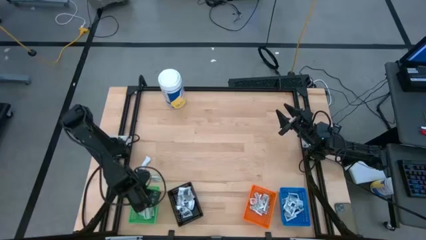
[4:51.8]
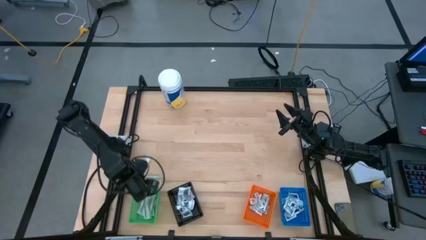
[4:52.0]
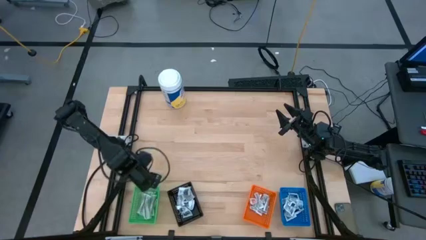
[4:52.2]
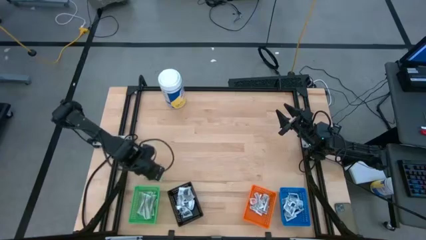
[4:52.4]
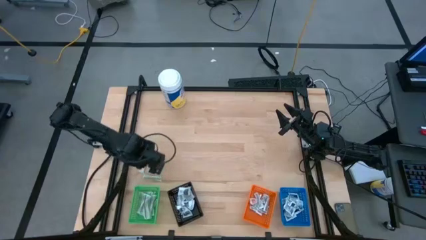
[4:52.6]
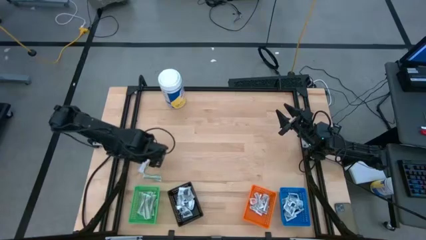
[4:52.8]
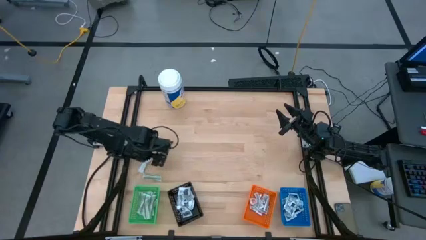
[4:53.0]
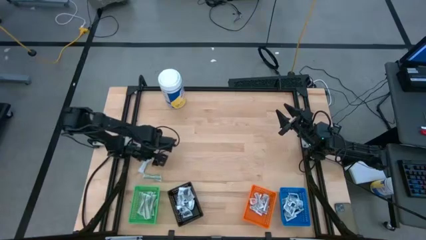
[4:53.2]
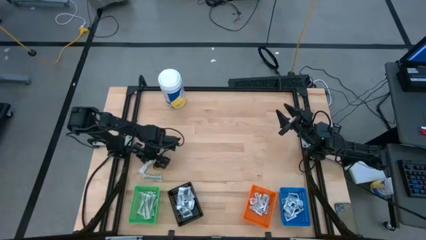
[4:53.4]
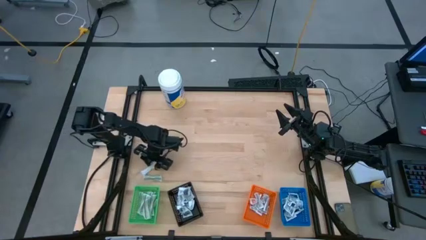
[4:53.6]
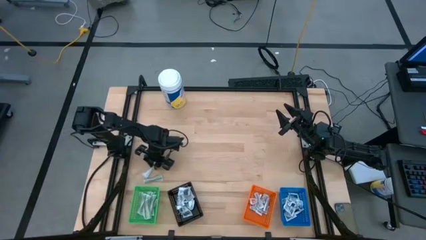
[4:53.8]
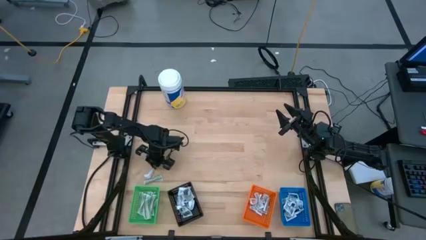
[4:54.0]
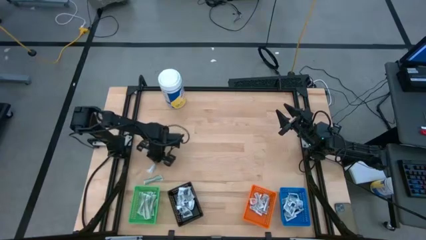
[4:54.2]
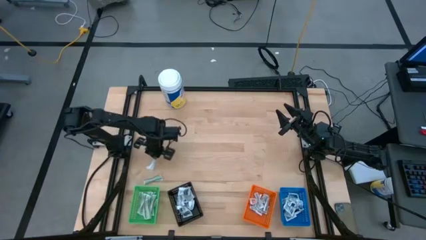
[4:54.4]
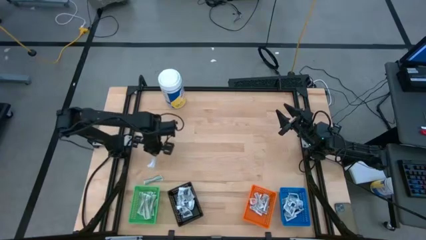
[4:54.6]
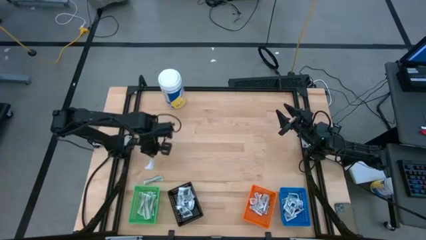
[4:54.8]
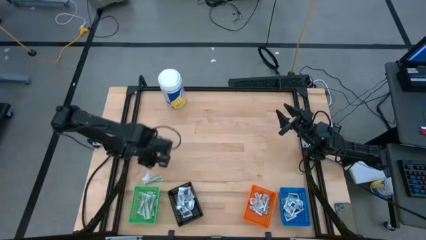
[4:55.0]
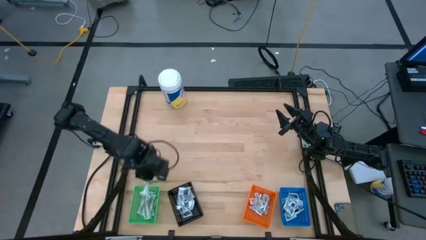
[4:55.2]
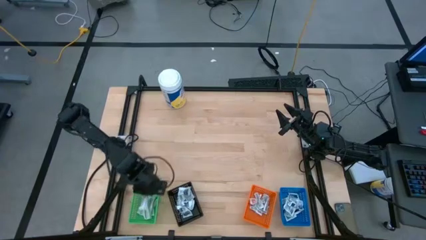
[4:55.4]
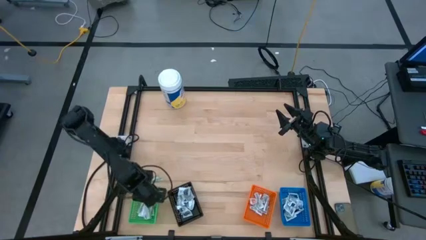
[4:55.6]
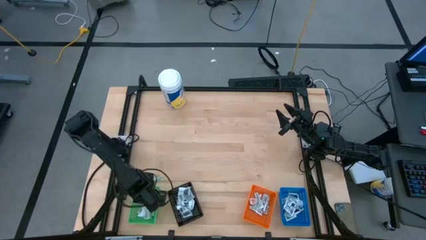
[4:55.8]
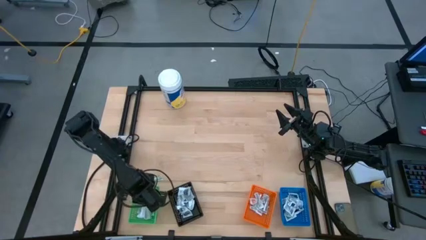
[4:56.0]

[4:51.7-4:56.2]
Task: Pick & Place First Aid Supplies
Put the bandage into the green bin

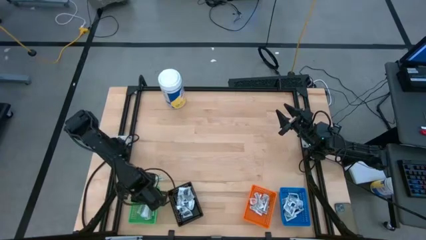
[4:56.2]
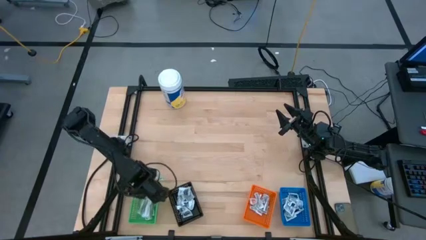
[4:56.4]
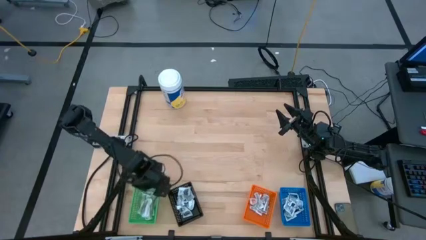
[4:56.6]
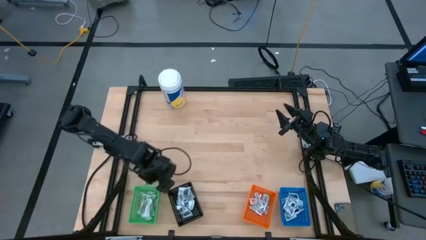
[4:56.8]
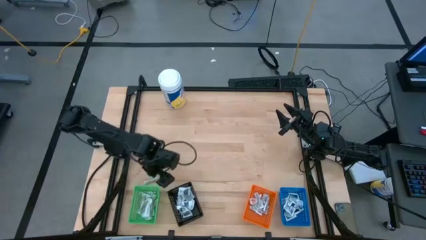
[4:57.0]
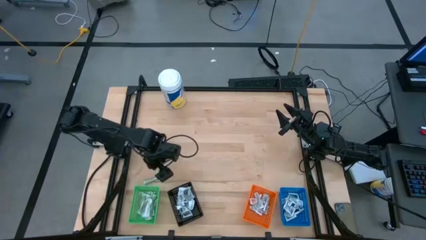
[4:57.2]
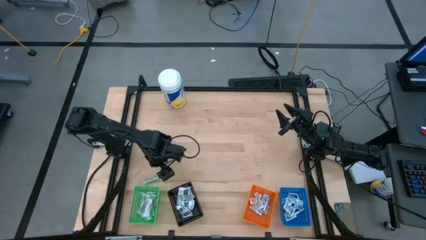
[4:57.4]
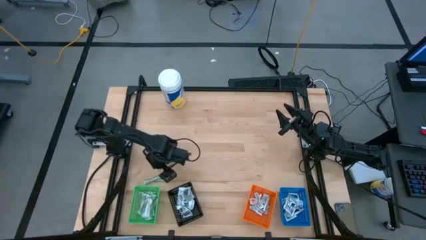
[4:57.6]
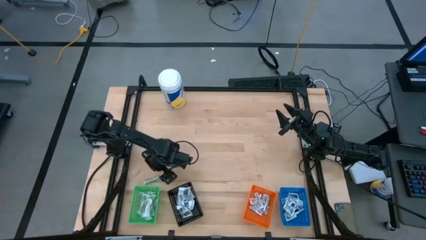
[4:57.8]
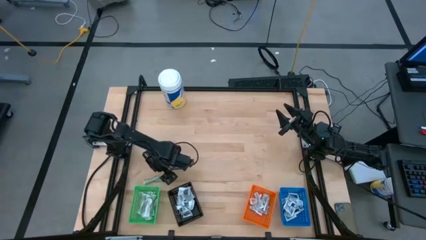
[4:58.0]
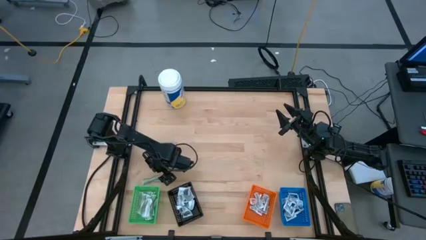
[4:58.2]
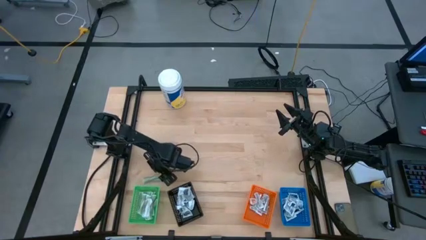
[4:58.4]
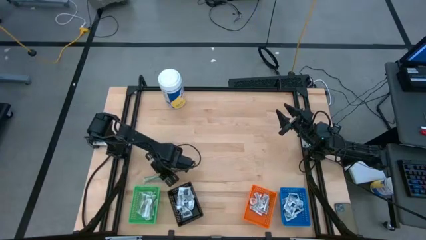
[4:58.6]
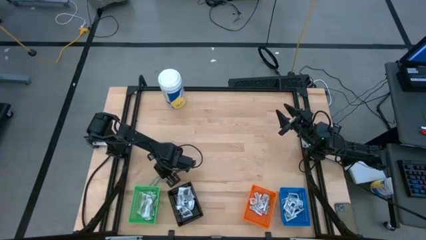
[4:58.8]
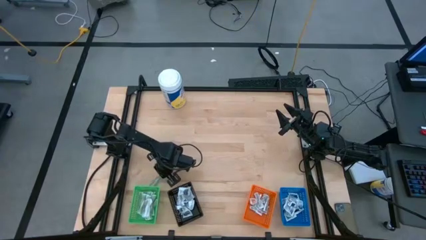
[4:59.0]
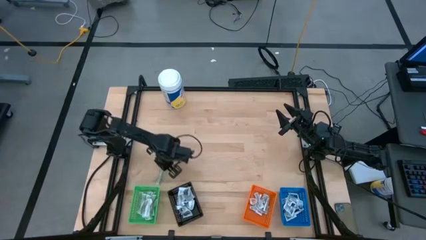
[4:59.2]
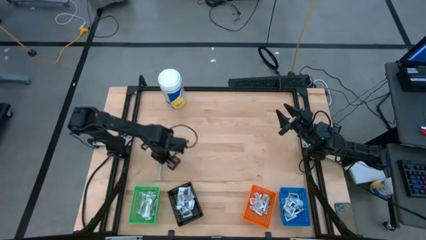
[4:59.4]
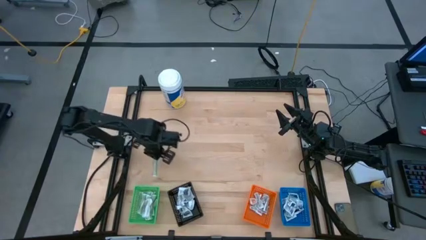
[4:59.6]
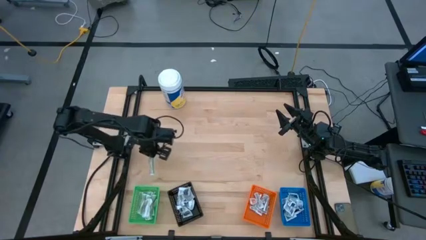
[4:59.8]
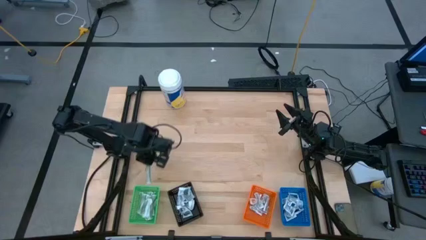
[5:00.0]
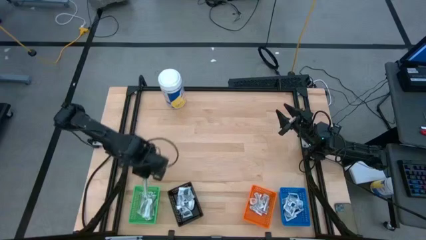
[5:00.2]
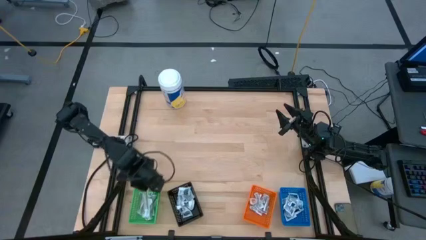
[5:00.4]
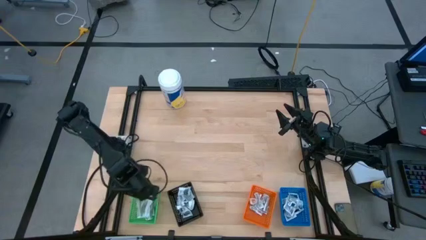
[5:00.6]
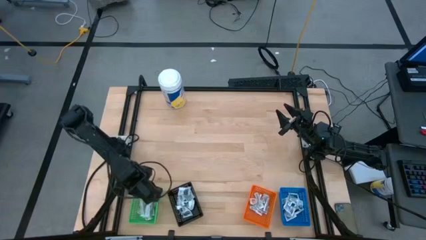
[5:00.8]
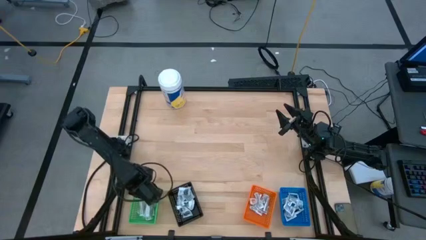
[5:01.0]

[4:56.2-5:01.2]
Put the bandage into the green bin

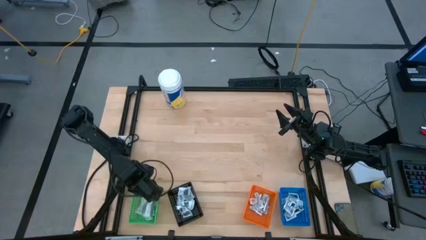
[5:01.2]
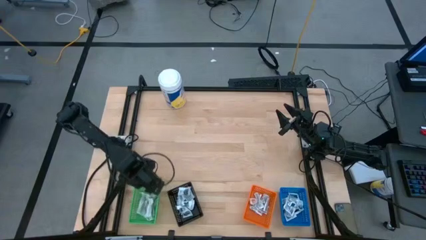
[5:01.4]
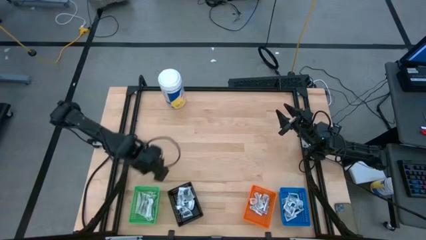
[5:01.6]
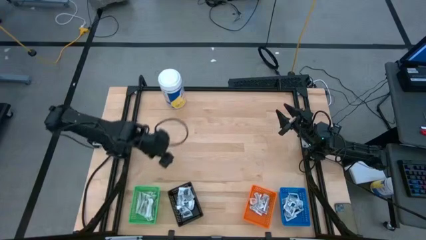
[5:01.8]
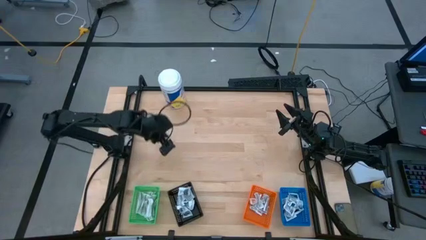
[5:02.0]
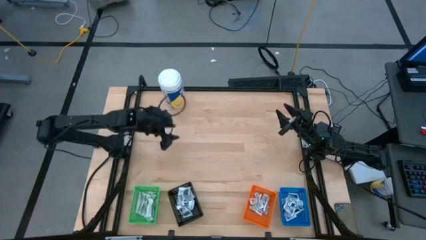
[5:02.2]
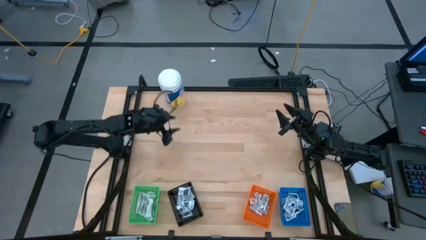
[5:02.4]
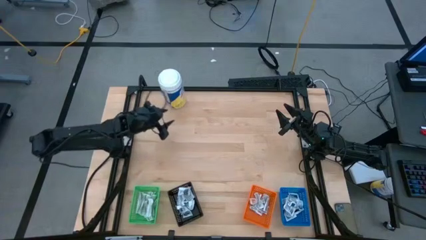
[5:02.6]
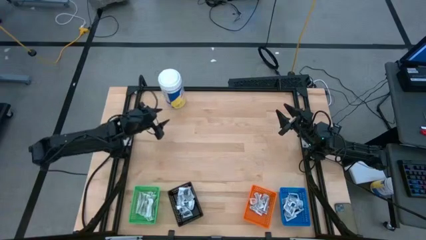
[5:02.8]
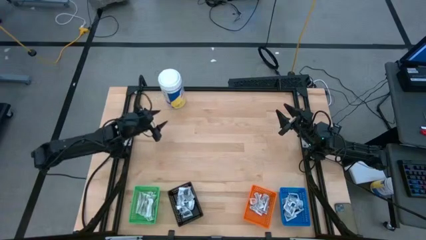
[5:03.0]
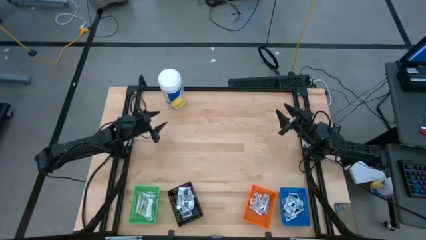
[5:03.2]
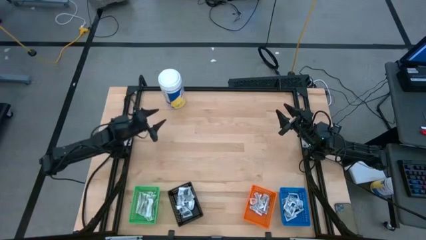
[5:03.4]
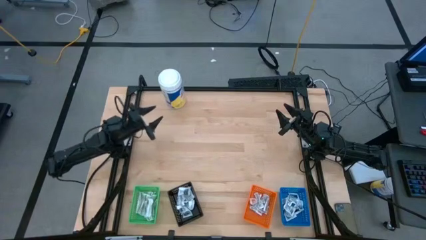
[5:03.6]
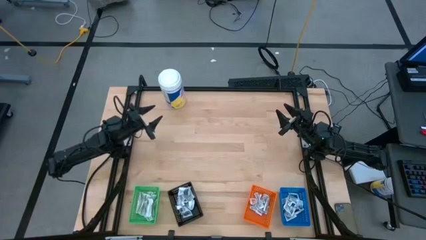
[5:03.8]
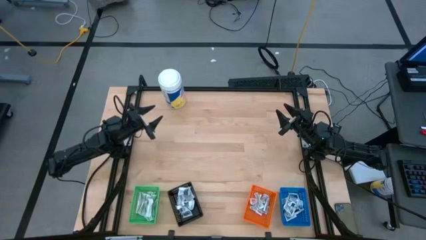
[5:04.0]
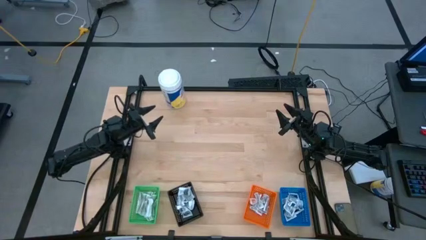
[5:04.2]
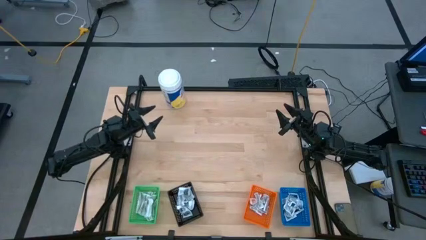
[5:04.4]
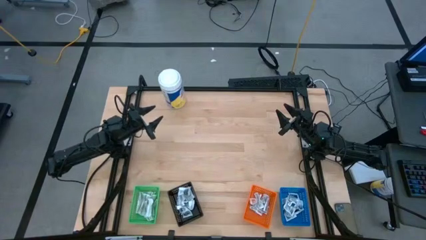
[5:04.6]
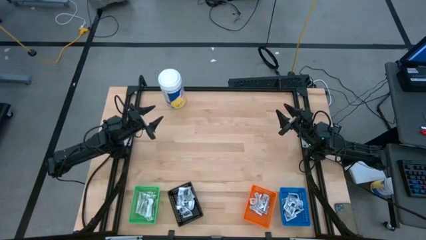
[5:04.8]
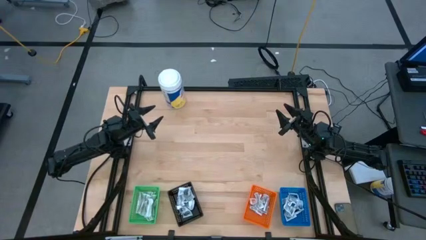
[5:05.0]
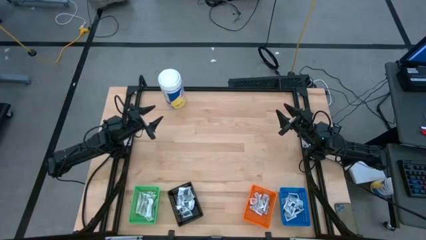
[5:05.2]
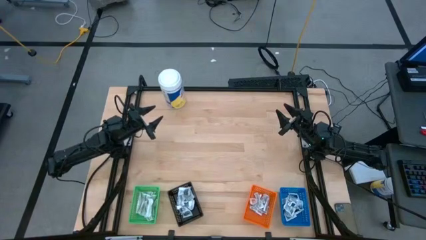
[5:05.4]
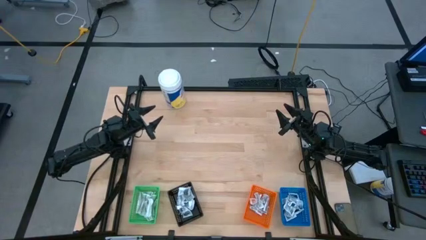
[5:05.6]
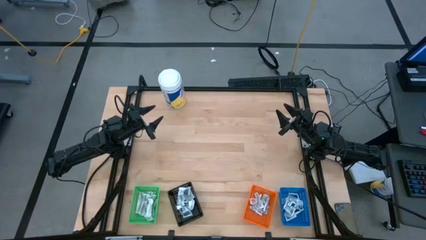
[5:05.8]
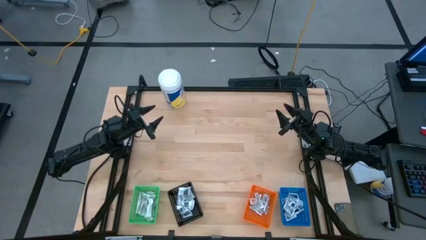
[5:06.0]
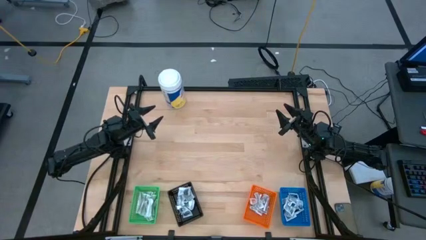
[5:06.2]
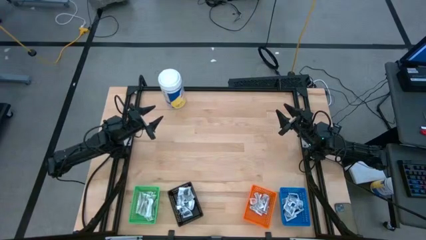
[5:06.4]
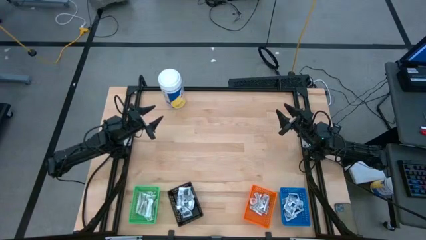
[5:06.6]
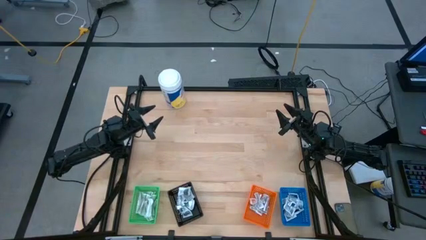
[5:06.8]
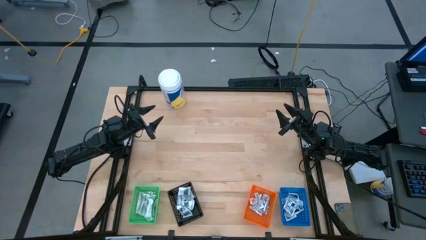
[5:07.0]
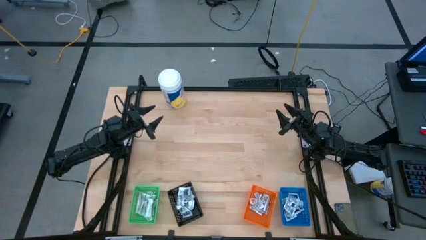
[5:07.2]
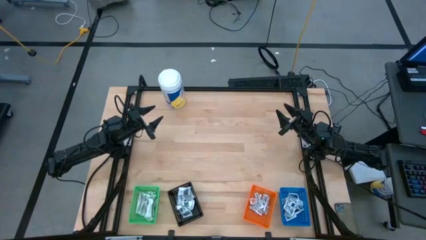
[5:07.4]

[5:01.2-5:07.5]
Return to Home Position

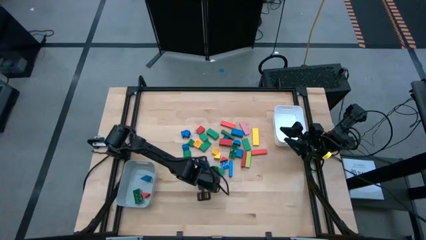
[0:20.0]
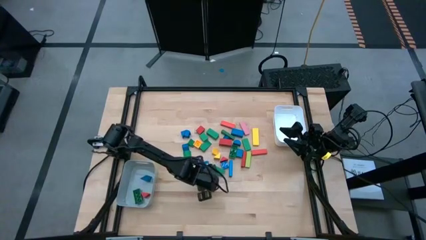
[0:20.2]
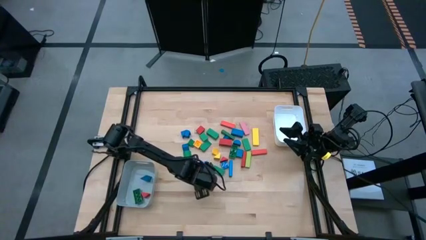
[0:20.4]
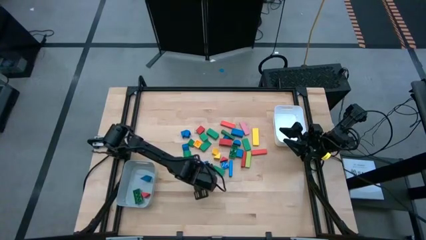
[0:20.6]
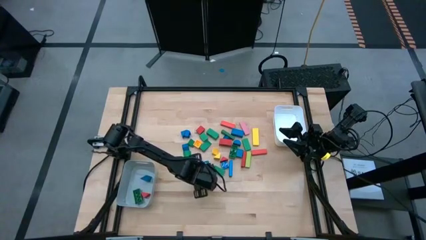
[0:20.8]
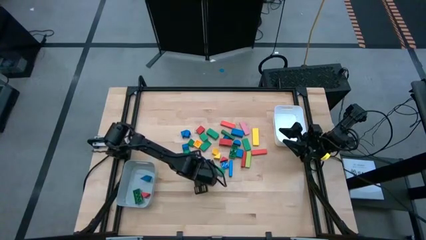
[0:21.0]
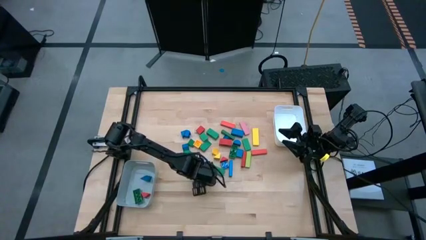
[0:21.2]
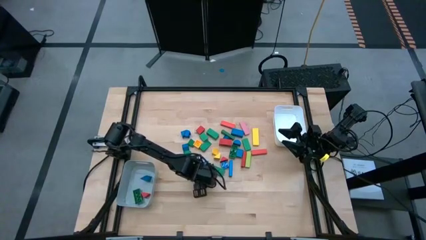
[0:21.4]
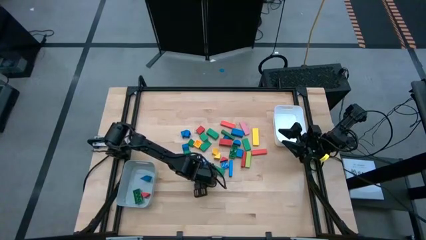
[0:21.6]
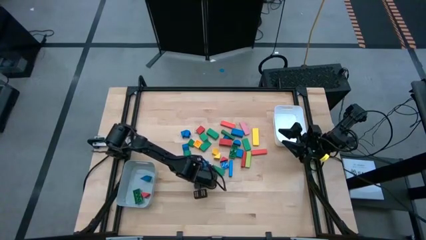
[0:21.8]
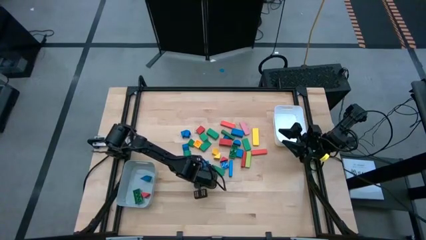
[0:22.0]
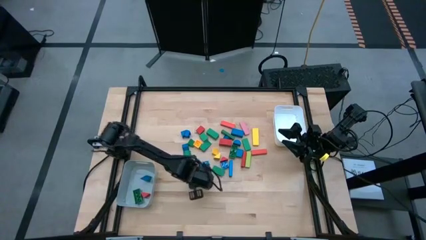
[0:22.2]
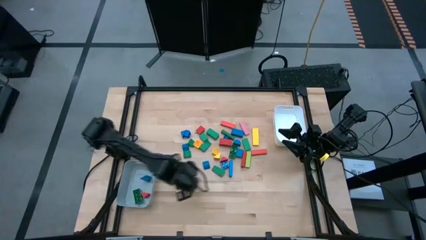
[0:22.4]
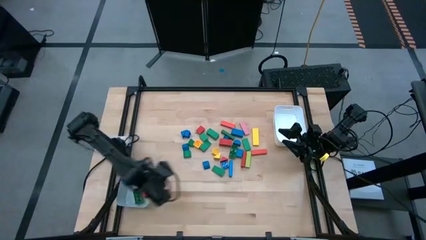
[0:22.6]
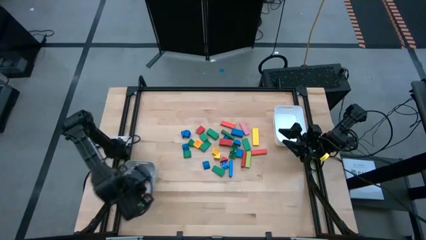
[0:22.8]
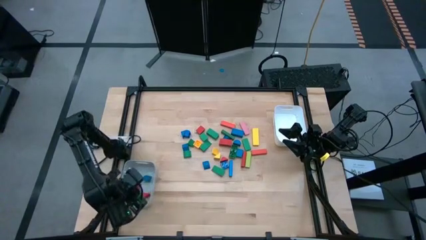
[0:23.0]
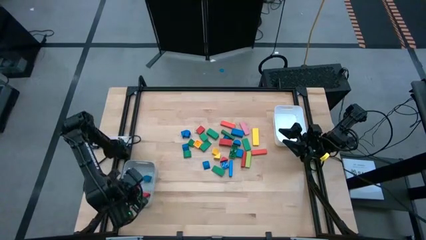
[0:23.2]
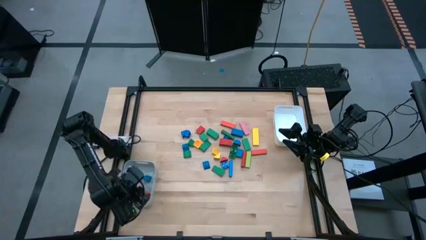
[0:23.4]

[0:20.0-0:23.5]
Task: Sort blocks by size
Put the orange triangle block into the gray bin
